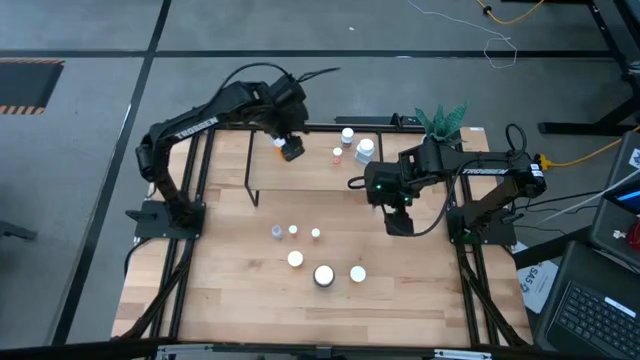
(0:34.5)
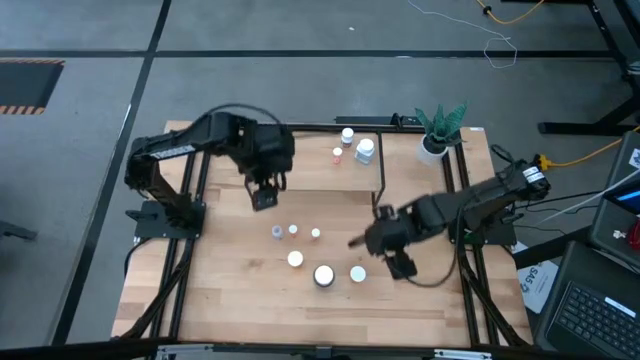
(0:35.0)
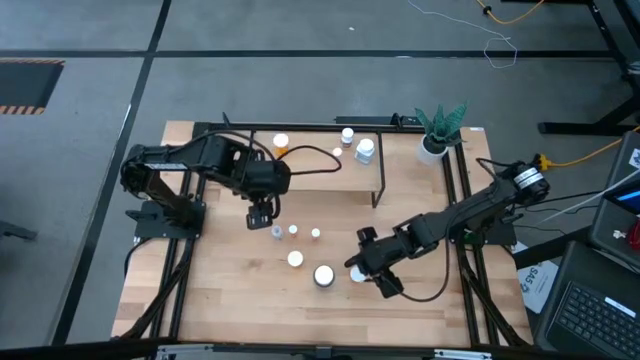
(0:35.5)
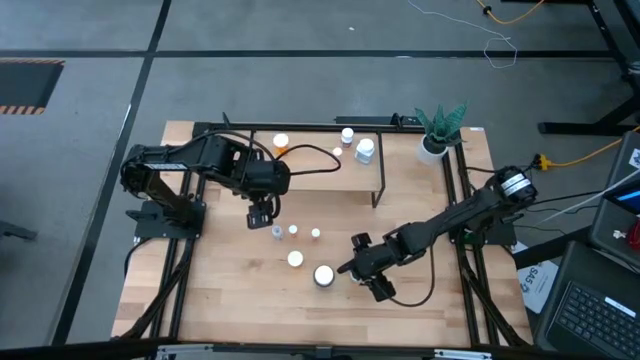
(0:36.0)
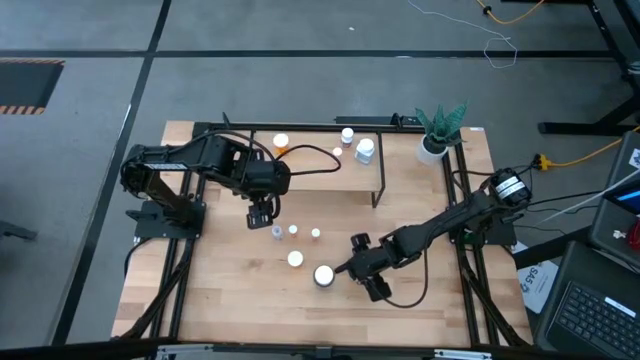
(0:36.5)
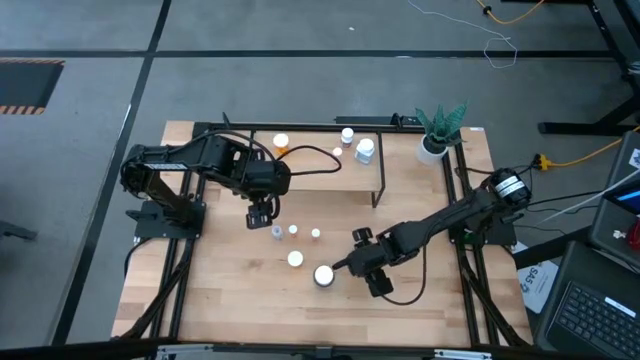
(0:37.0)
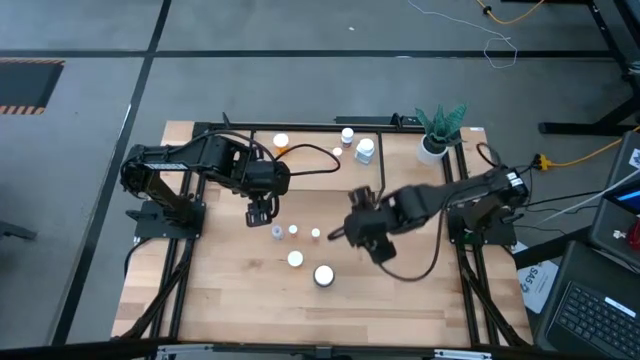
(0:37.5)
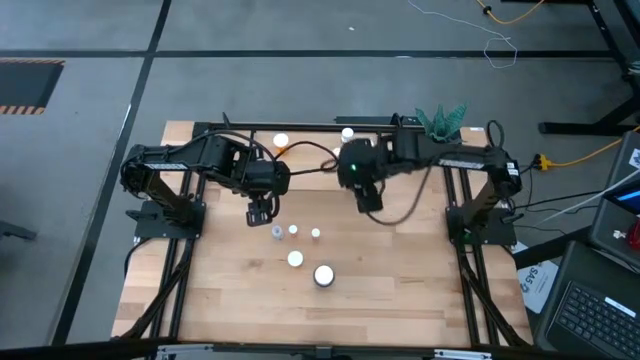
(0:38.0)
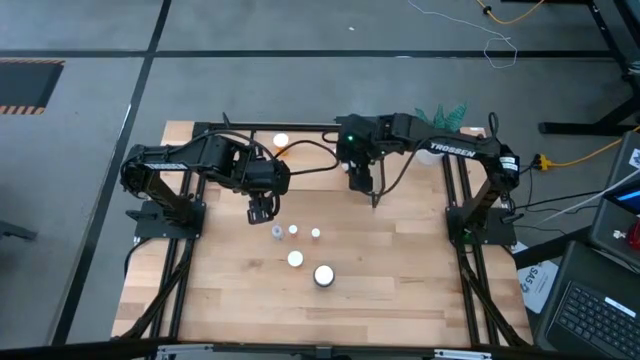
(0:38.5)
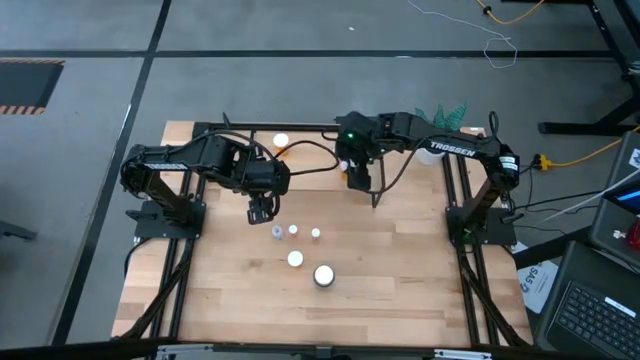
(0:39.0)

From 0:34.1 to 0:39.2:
Task: Pick and place medicine bottles onto shelf by color
Put the right orange pill bottle on the shelf

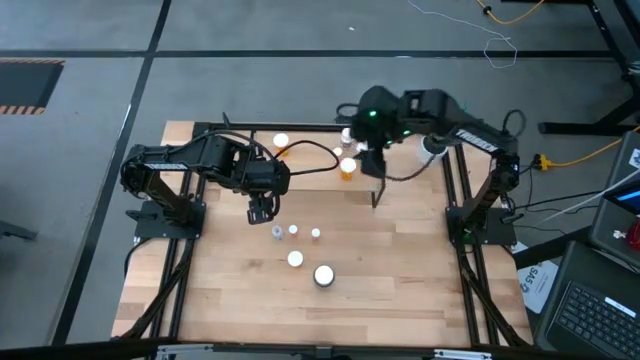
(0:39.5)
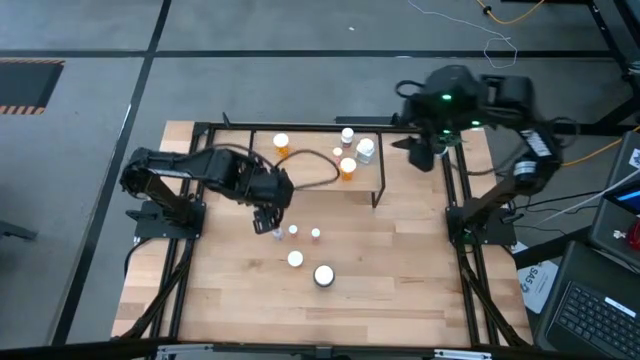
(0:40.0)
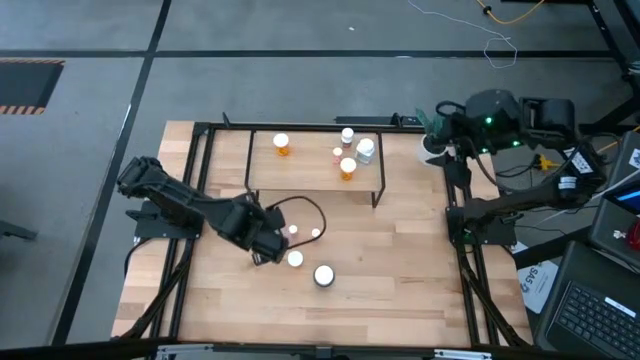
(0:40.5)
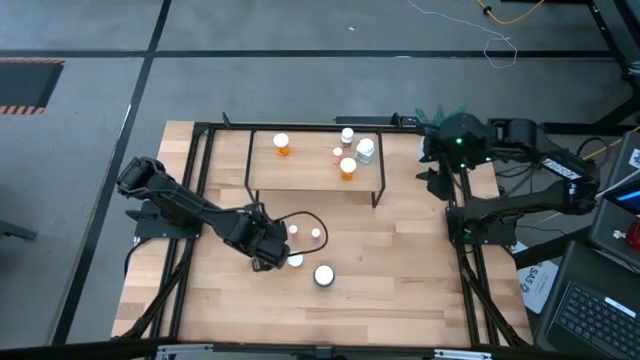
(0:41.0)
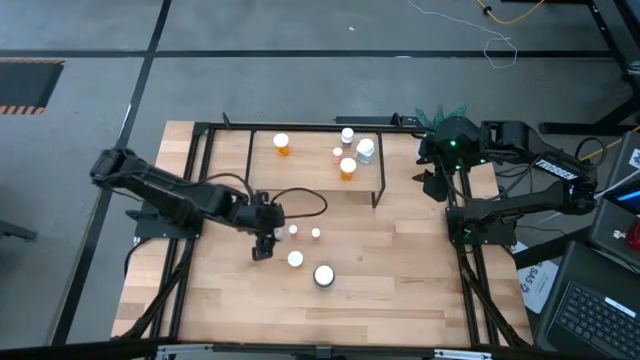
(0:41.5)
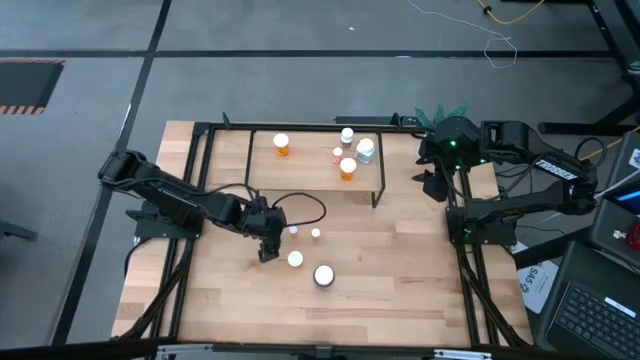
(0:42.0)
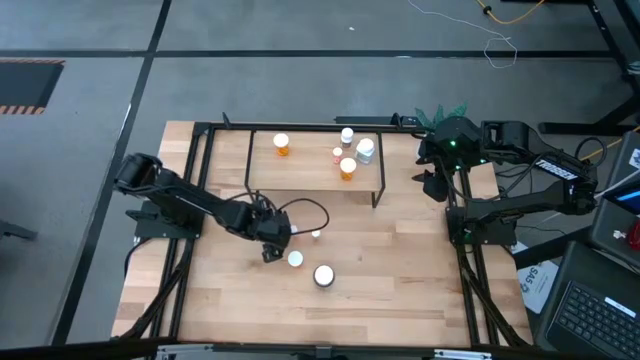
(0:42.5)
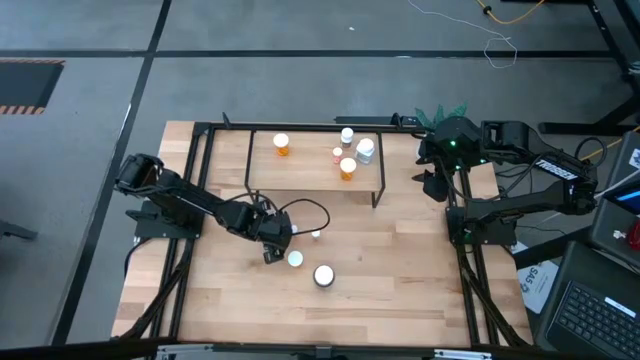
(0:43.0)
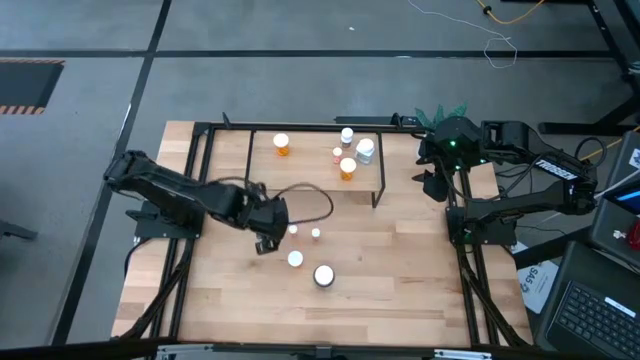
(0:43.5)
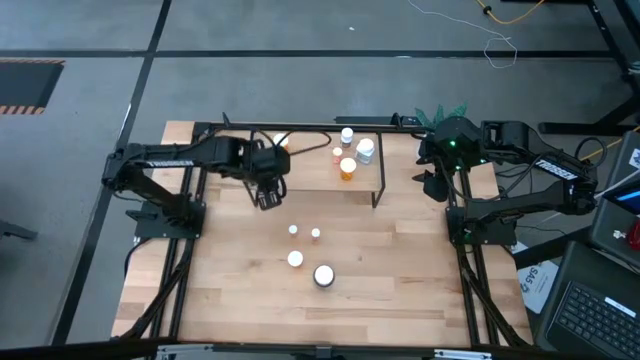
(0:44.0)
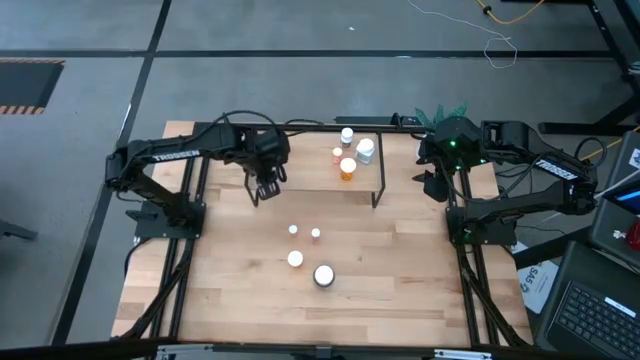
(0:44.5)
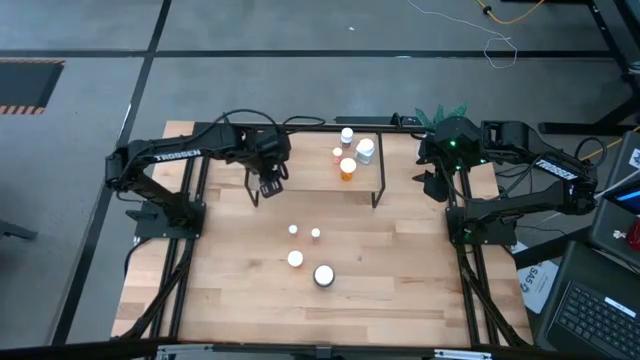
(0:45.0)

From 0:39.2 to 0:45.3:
Put the transparent pill bottle on the shelf

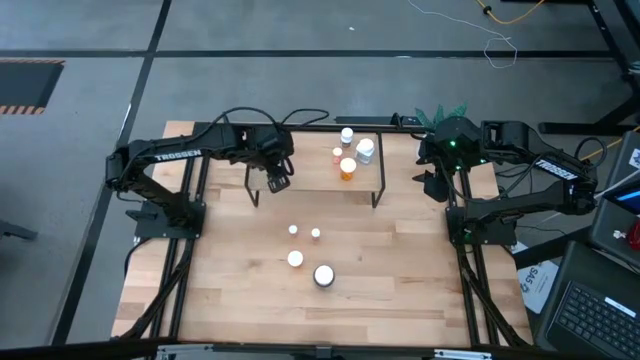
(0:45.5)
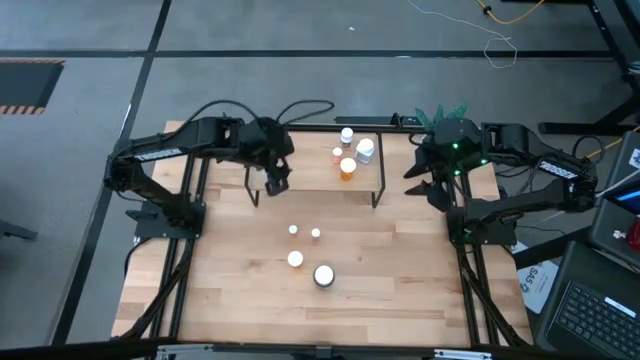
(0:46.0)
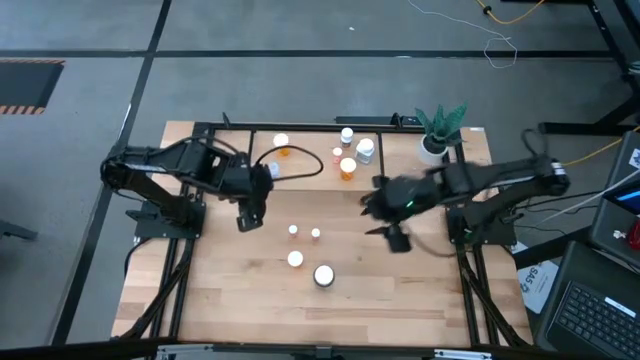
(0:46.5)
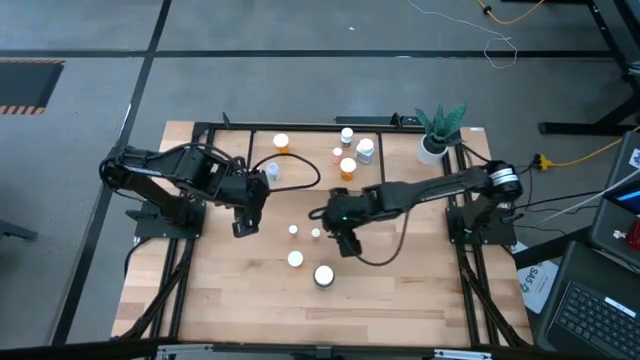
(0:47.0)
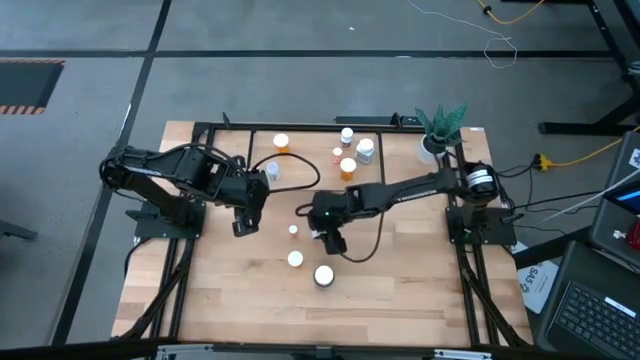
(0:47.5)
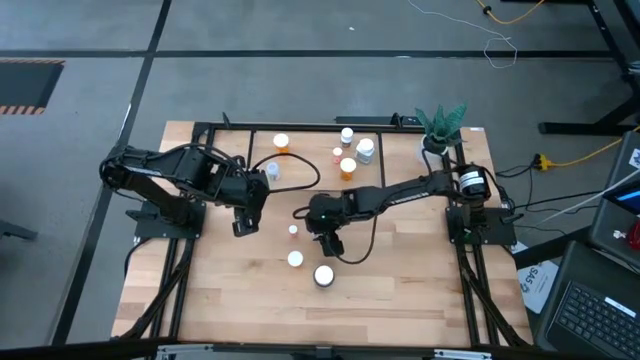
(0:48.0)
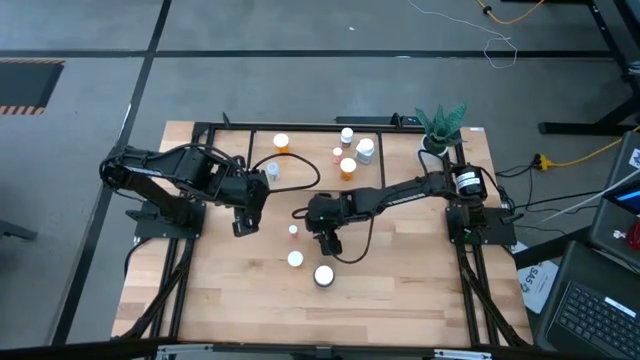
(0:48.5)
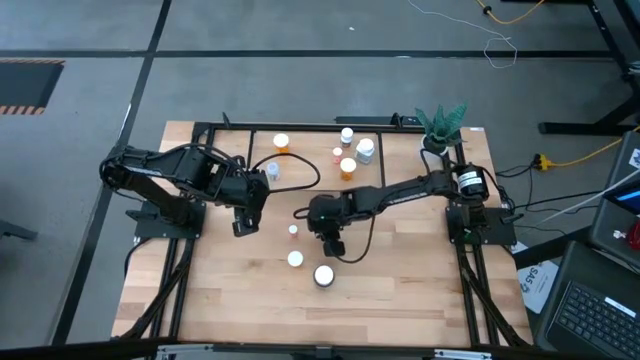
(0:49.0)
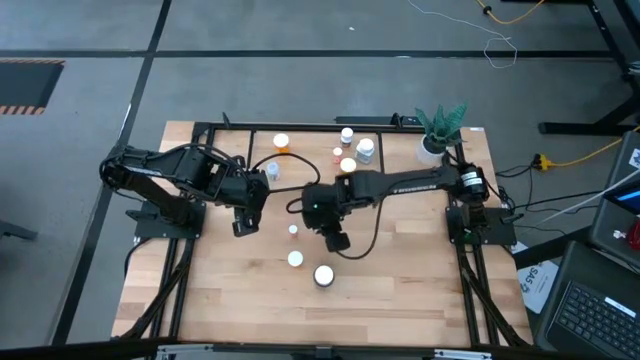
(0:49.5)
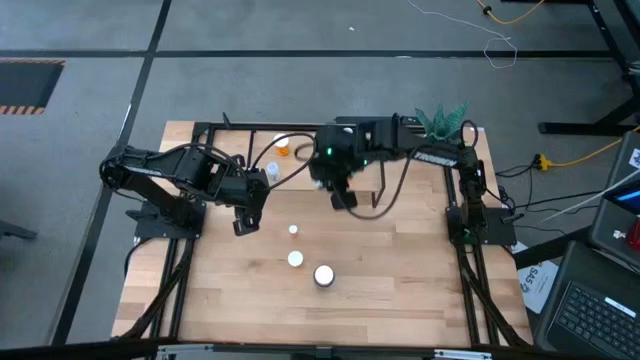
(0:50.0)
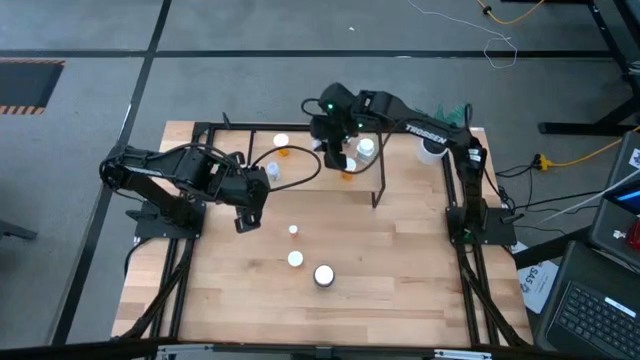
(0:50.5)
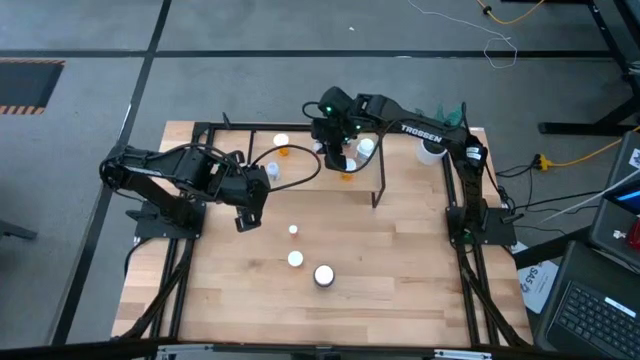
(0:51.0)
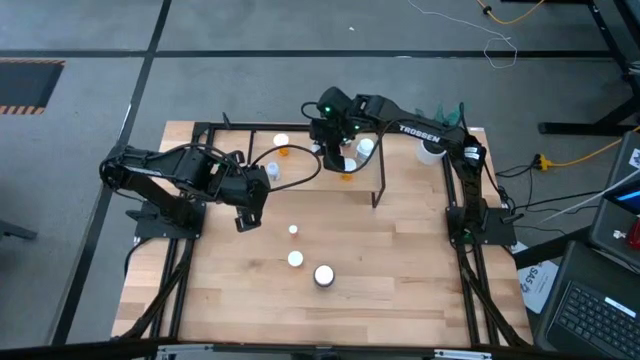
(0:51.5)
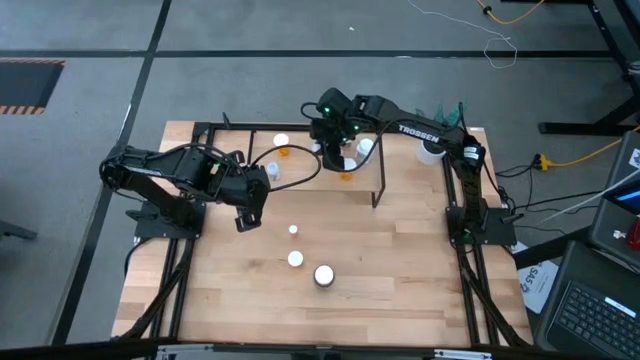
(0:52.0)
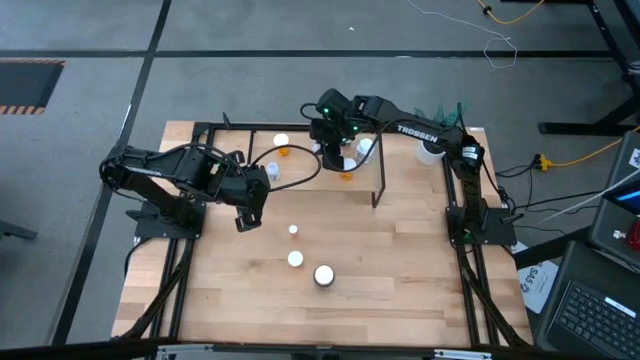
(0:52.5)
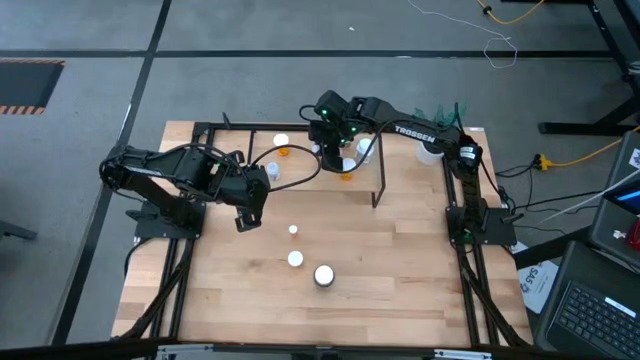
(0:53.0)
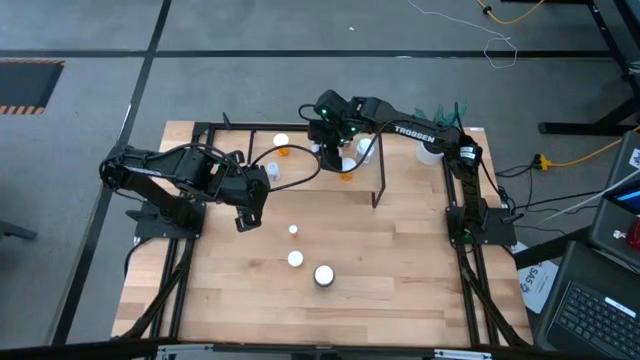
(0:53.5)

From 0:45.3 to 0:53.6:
Put the right pink pill bottle on the shelf

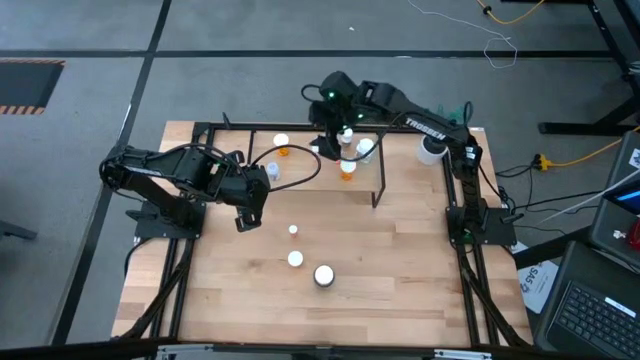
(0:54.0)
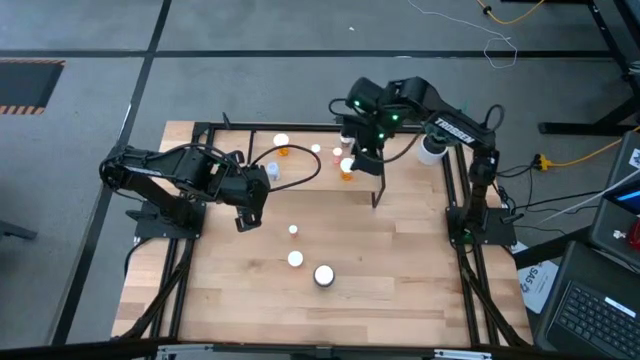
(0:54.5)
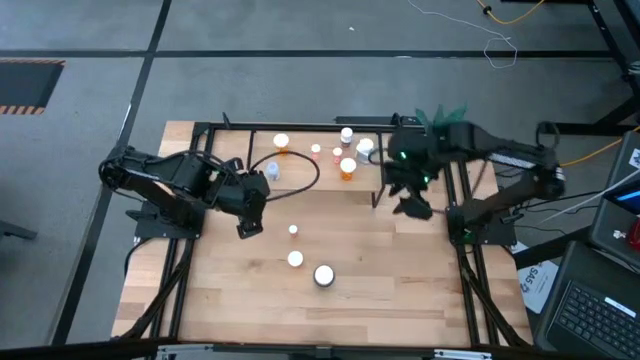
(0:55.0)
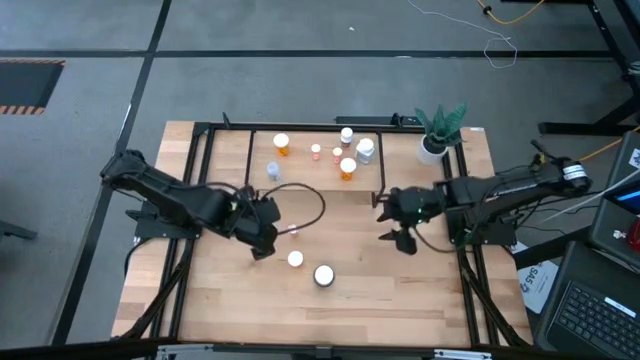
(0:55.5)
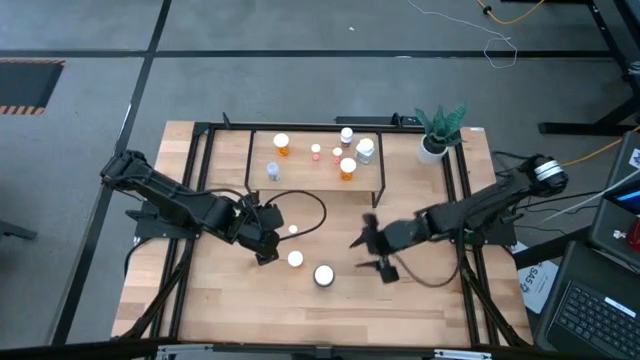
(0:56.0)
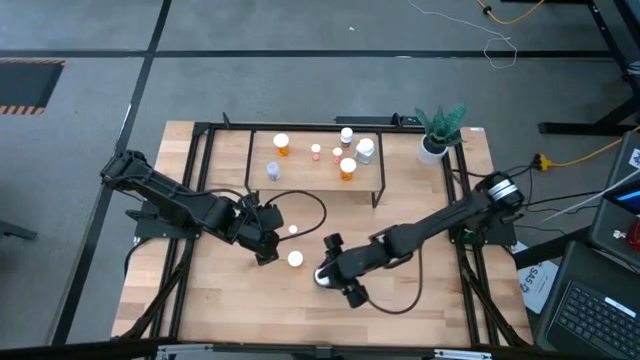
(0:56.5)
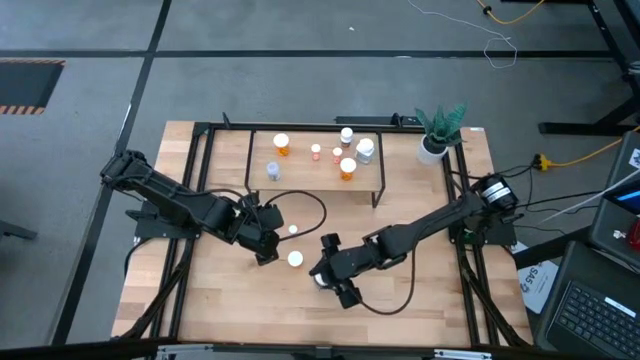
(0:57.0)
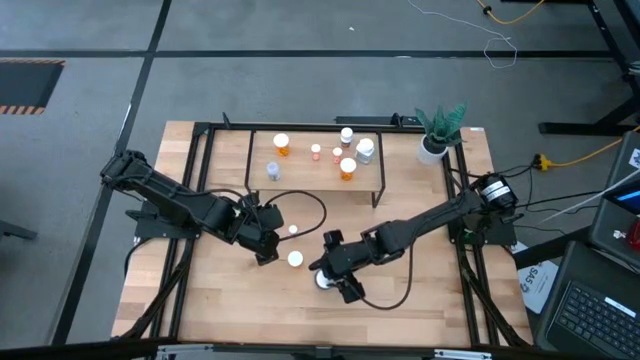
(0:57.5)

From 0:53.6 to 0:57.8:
Put the green medicine container on the shelf
